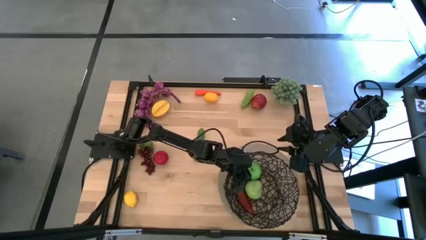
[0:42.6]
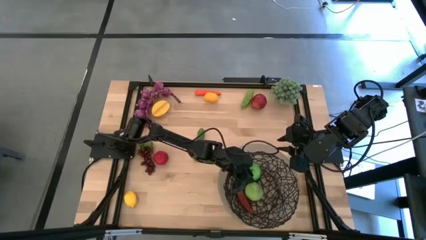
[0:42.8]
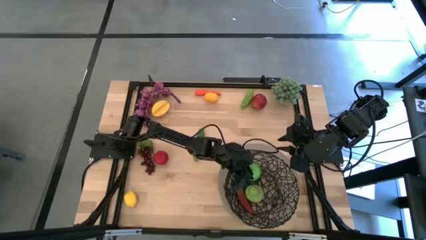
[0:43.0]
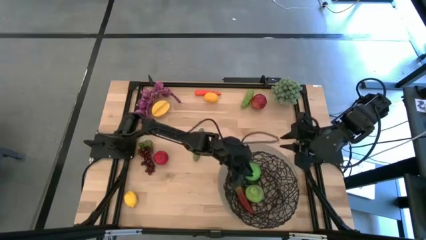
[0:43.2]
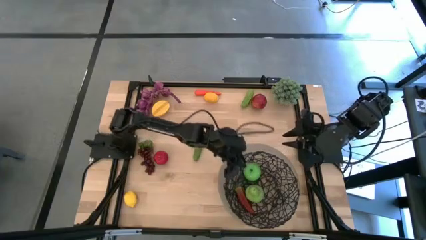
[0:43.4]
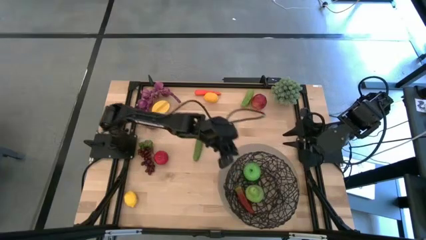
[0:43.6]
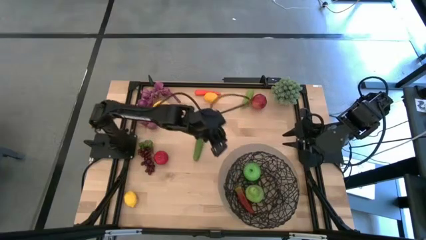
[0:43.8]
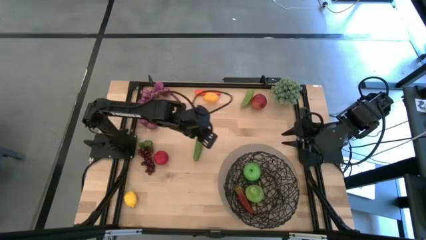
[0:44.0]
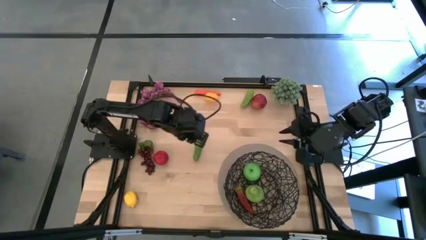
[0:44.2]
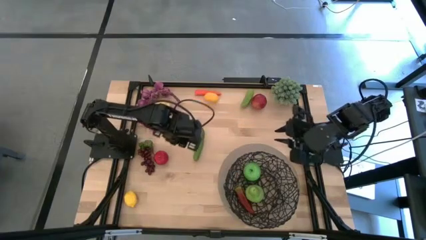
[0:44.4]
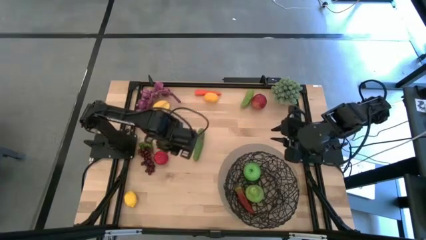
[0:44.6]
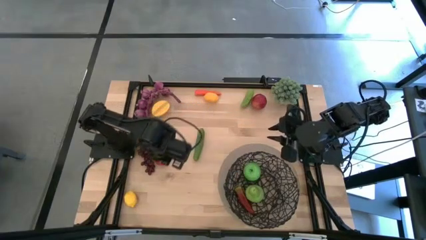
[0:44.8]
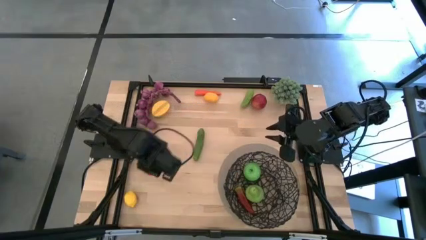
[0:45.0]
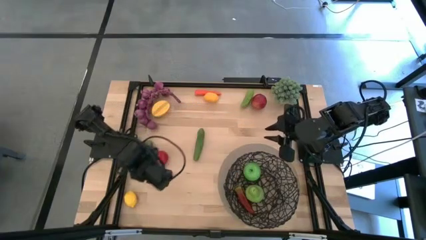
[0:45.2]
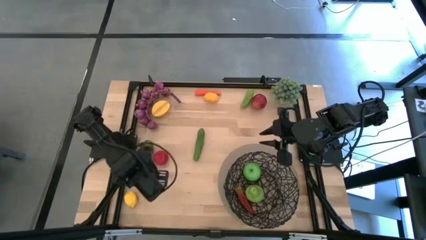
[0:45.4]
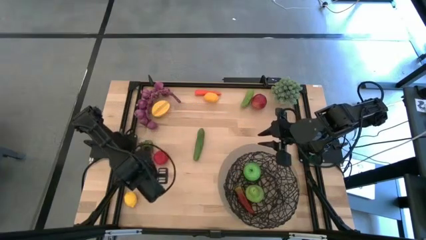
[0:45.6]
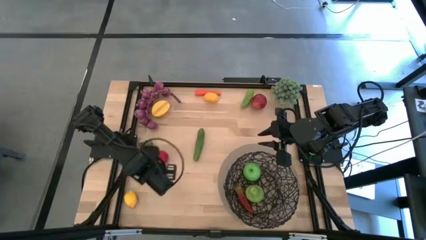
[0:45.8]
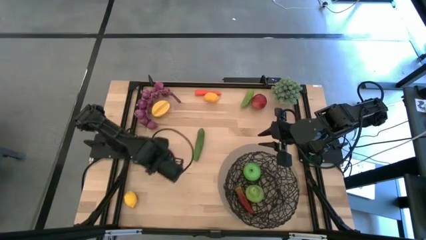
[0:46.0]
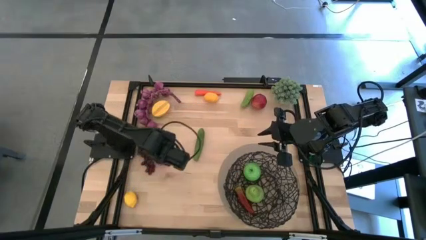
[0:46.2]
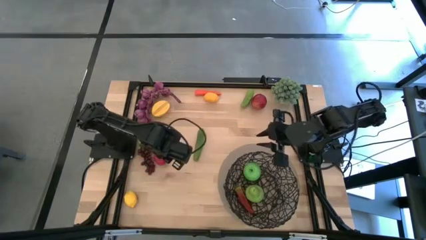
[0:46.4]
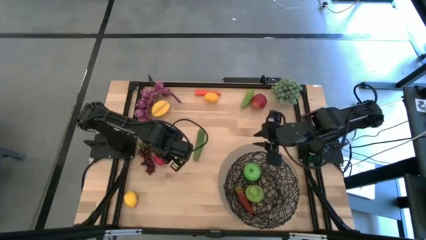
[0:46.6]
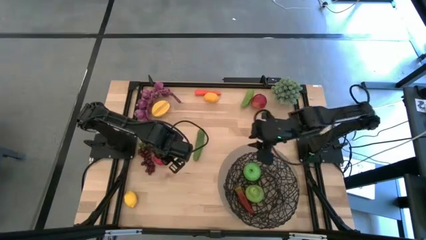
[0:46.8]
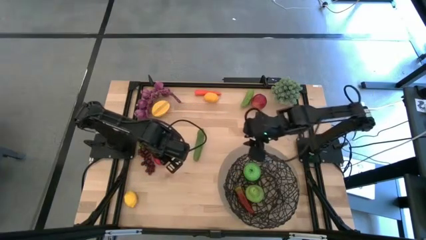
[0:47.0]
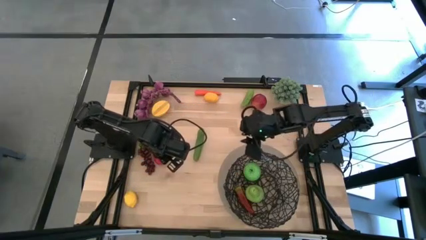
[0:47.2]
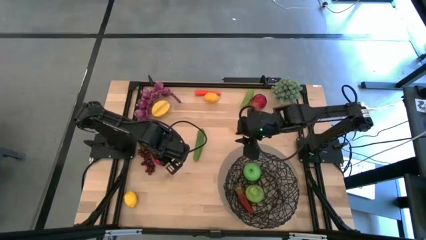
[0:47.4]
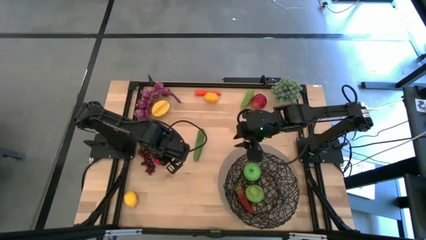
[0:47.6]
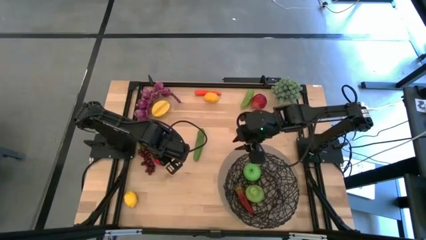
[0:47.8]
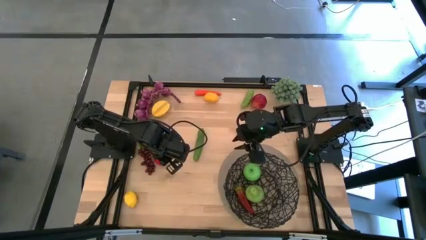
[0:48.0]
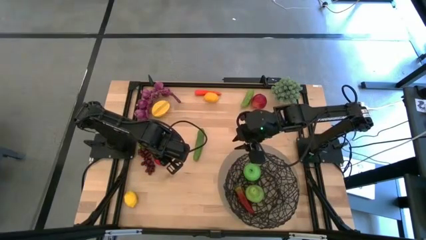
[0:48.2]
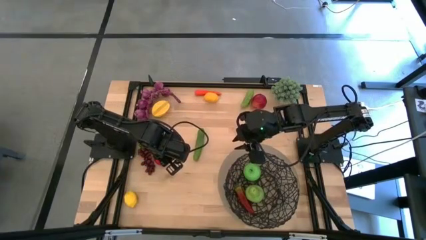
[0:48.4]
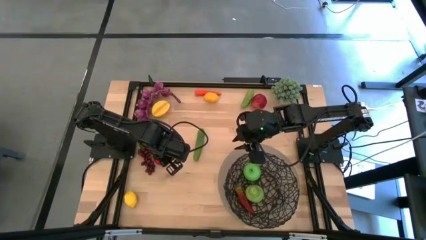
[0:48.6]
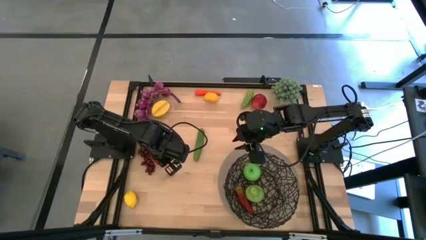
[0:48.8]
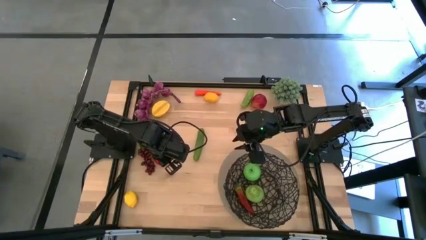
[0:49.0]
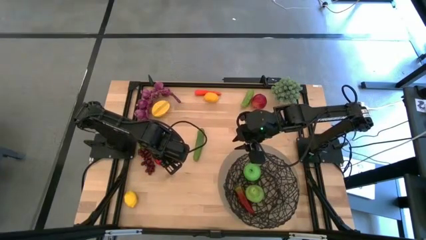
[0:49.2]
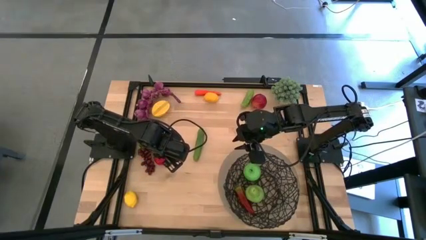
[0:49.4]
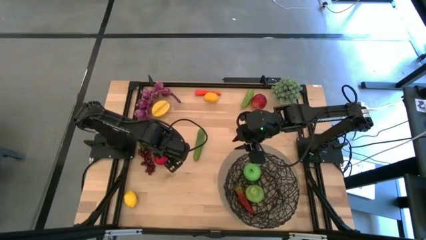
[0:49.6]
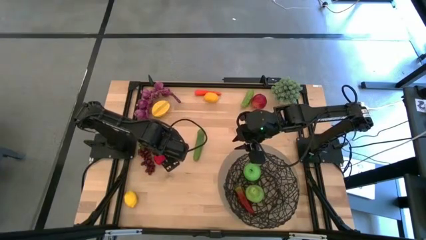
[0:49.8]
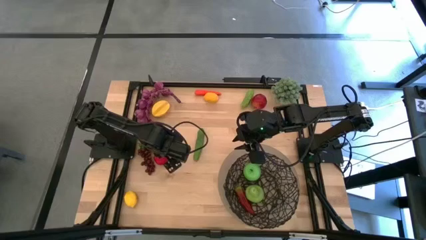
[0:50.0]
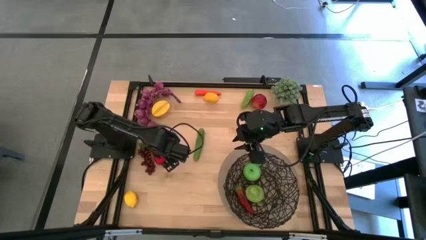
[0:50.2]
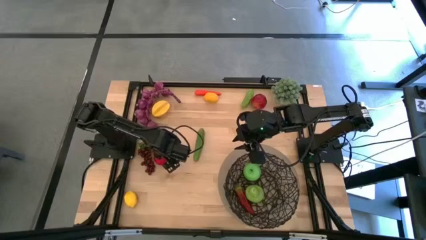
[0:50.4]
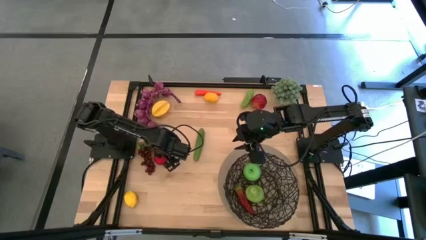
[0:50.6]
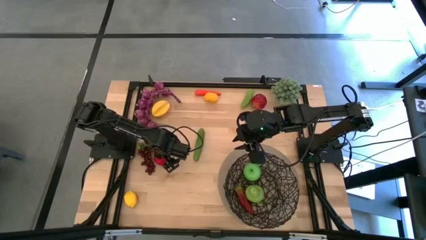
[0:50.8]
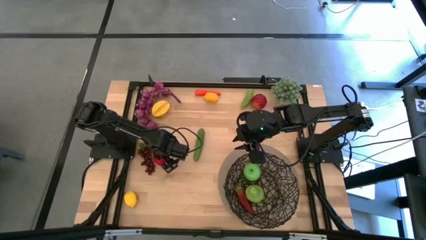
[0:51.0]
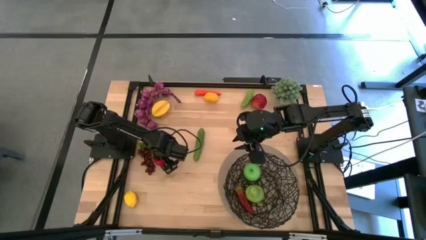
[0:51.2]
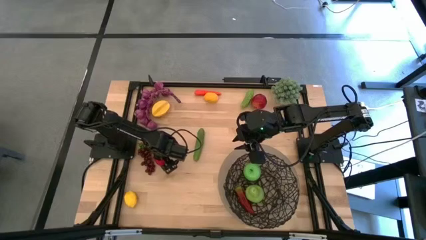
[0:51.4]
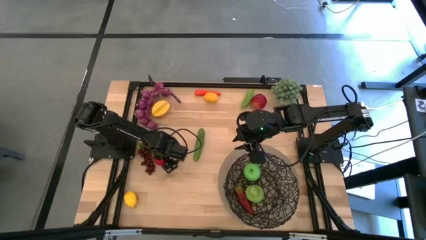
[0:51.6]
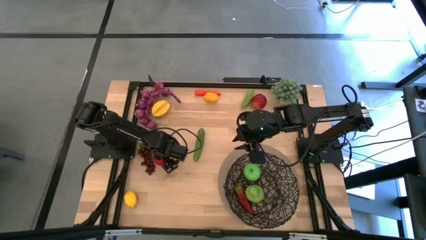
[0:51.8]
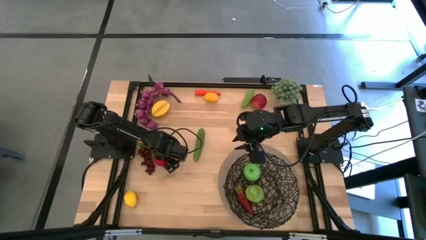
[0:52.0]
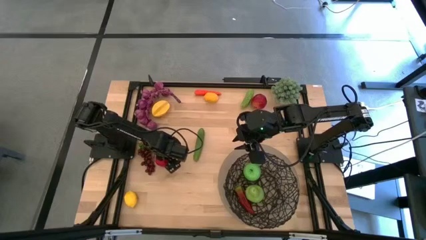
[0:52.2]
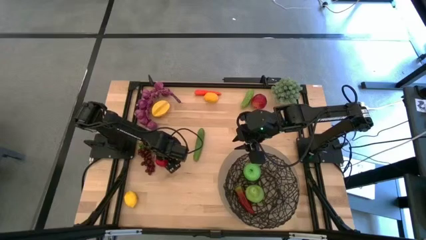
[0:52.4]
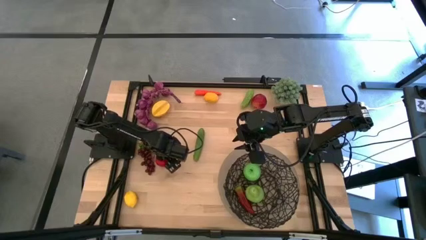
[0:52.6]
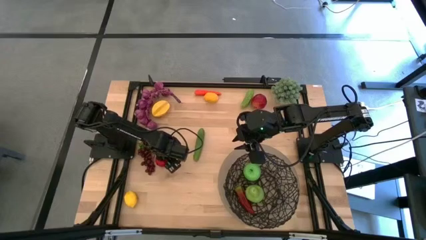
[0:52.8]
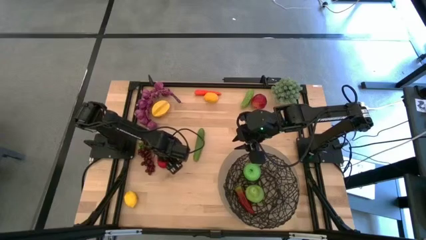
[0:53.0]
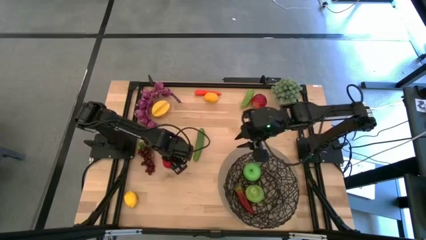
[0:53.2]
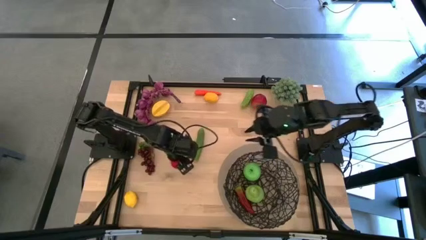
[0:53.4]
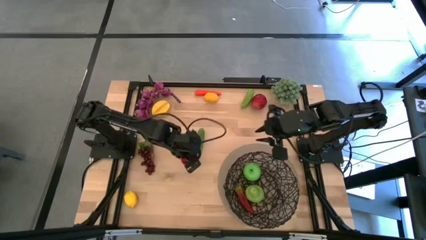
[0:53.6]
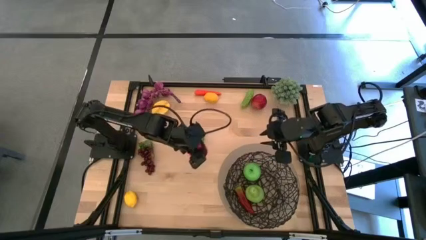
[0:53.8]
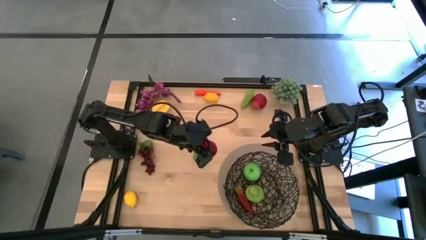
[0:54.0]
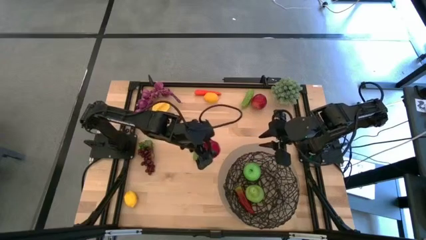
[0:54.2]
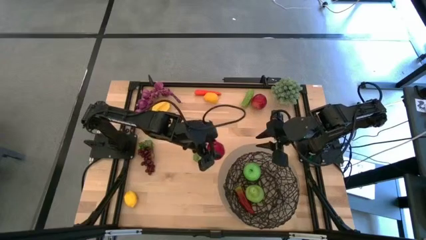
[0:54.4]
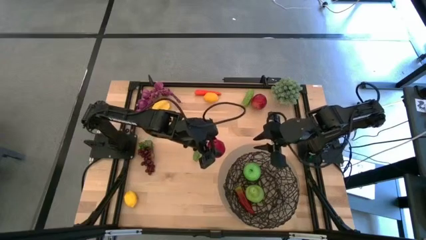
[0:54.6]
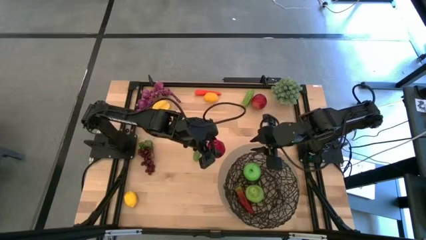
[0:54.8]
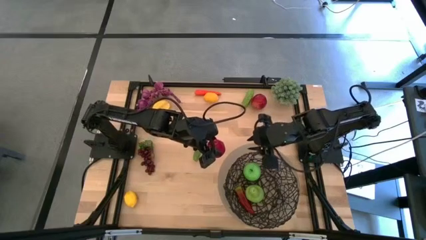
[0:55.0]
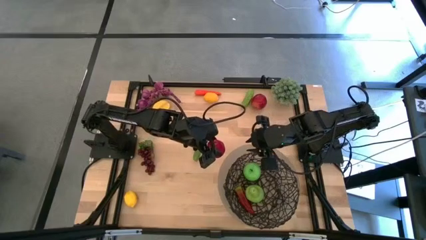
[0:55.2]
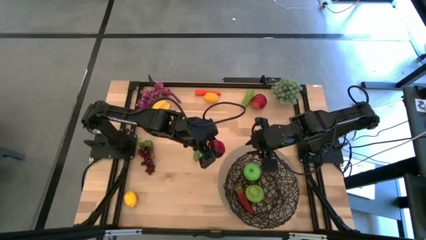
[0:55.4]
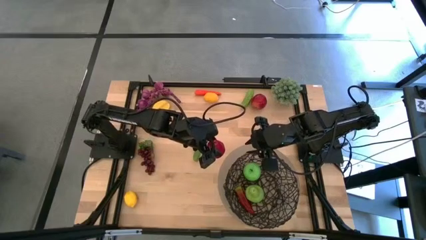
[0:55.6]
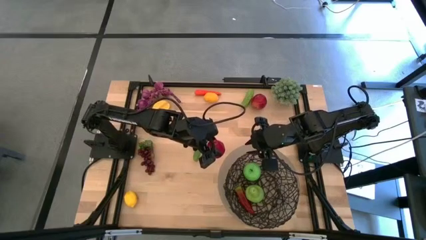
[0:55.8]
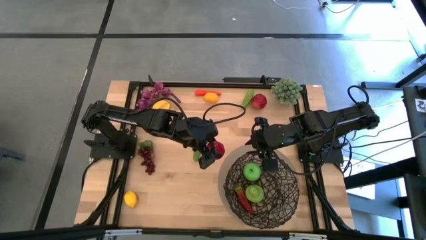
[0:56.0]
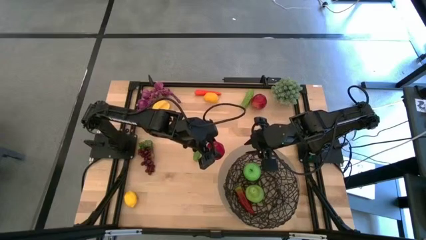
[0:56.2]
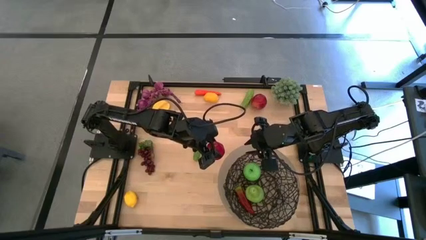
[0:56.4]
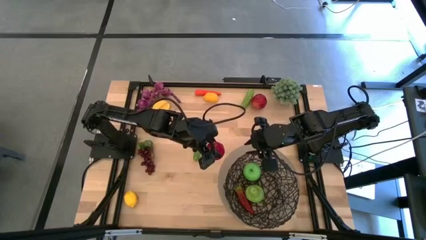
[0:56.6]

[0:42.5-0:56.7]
Task: Build produce basket
Put the red tomato into the wire basket
